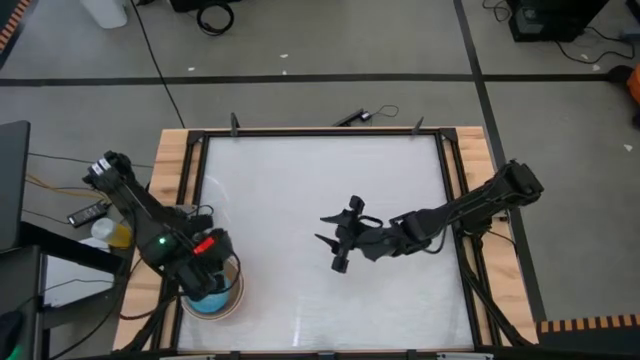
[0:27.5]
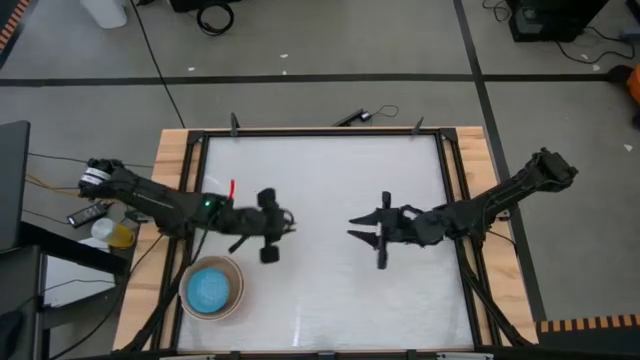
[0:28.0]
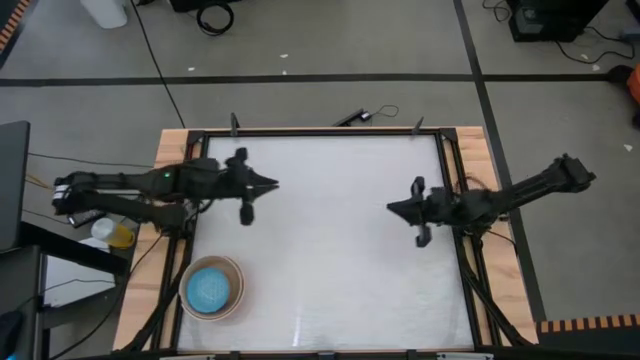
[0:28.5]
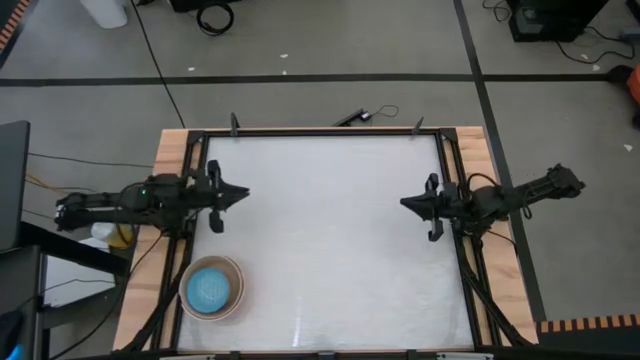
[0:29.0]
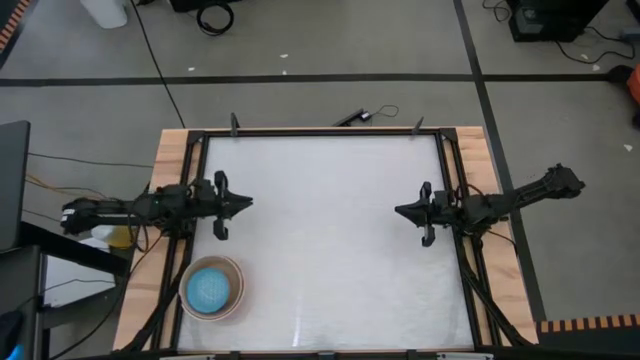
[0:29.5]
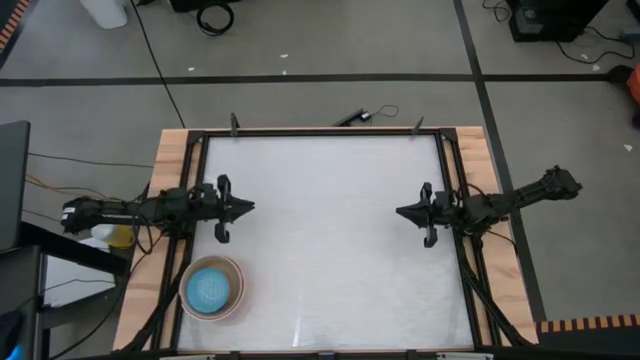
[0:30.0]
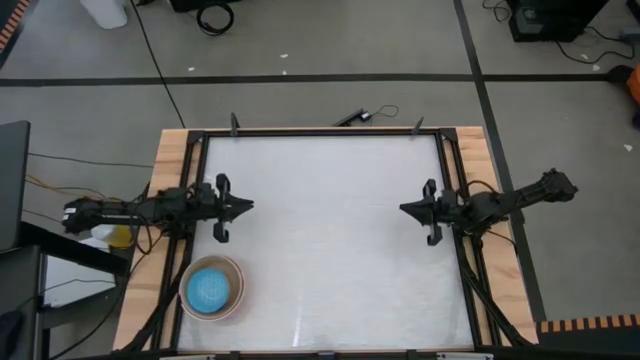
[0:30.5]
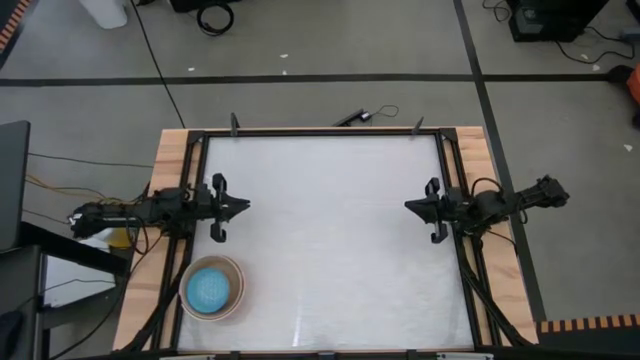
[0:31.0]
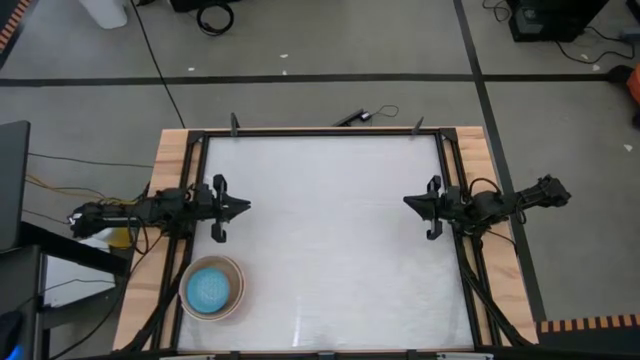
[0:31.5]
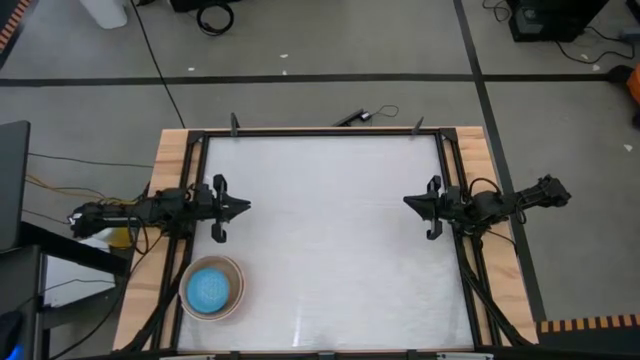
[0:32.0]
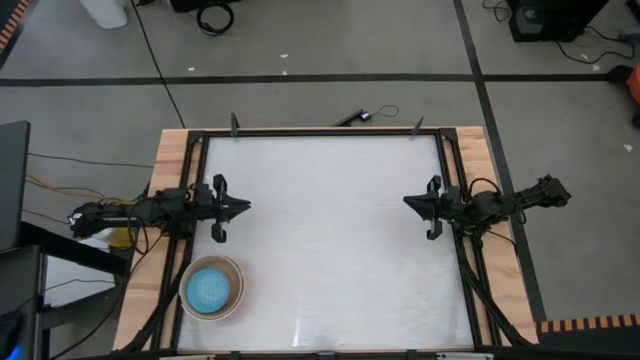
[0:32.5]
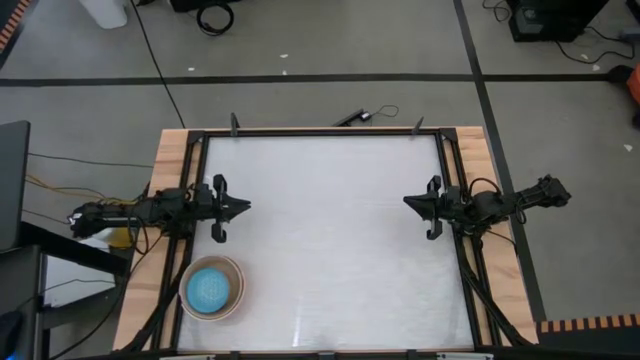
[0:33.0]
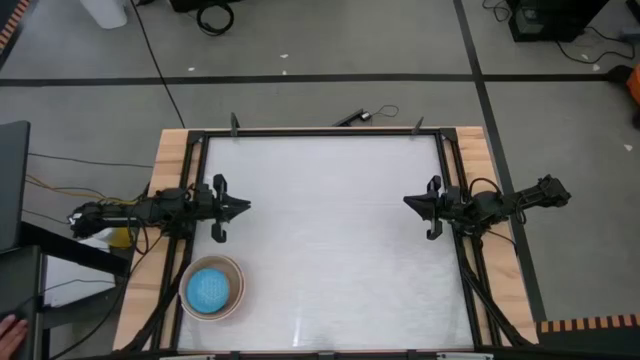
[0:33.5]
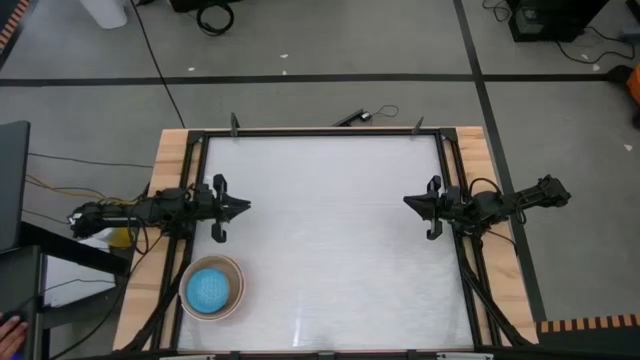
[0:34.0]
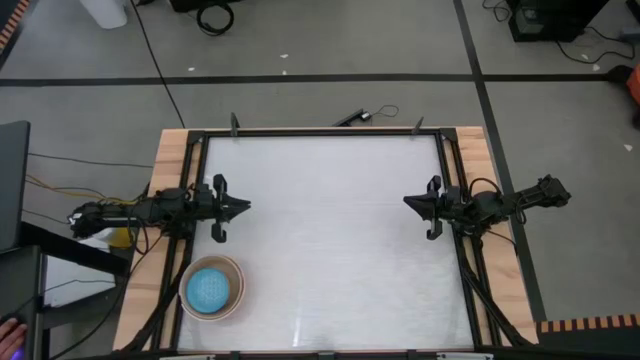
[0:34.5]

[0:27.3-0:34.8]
Return to Home Position

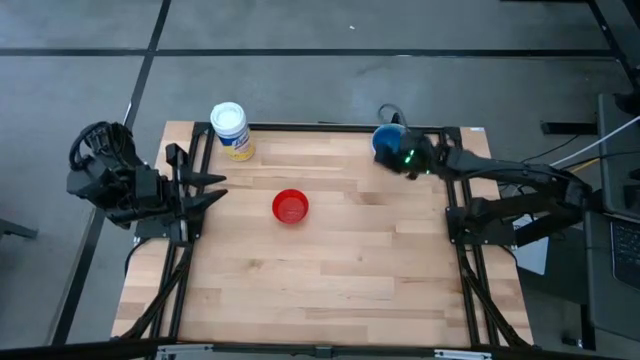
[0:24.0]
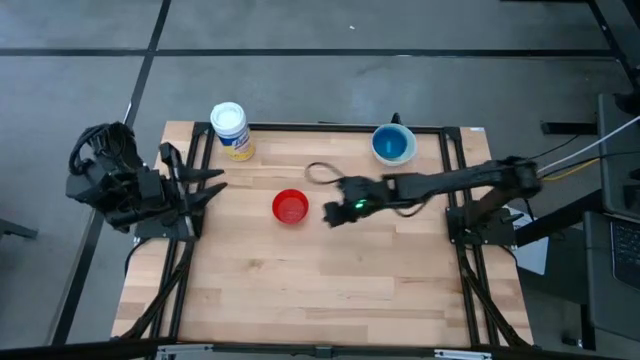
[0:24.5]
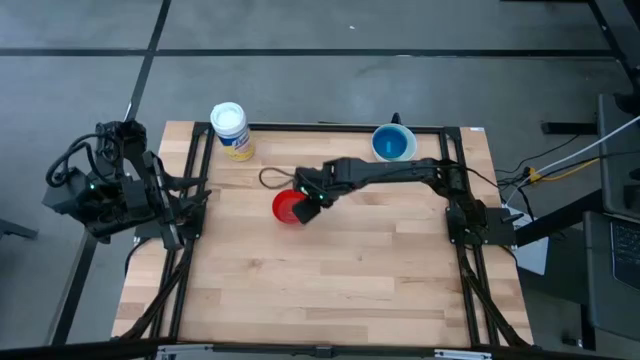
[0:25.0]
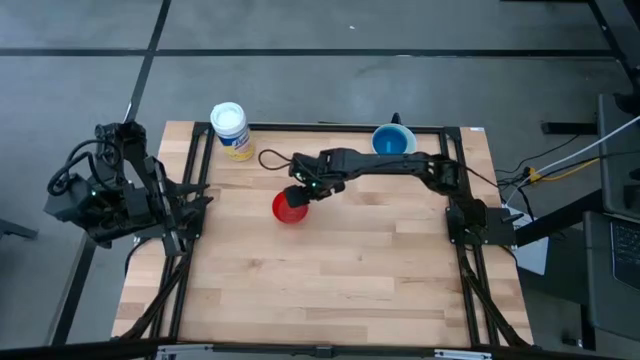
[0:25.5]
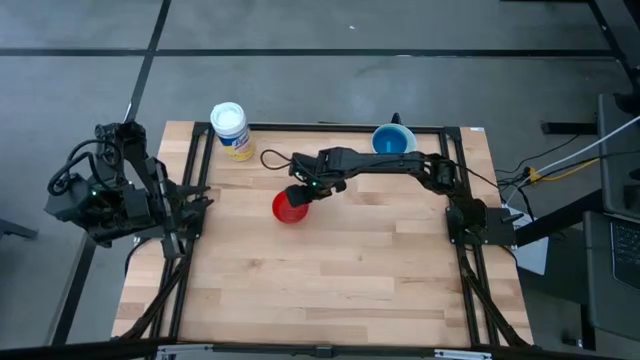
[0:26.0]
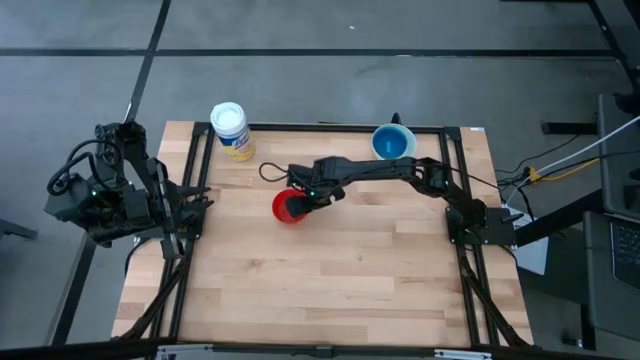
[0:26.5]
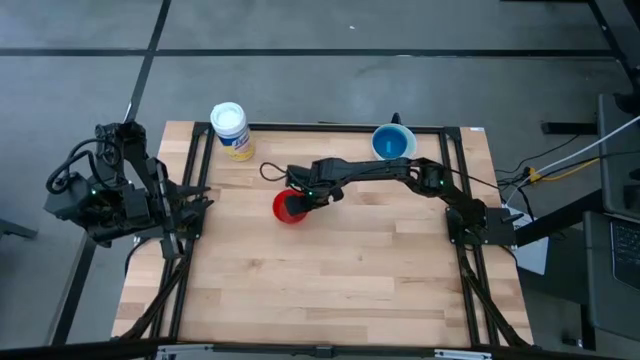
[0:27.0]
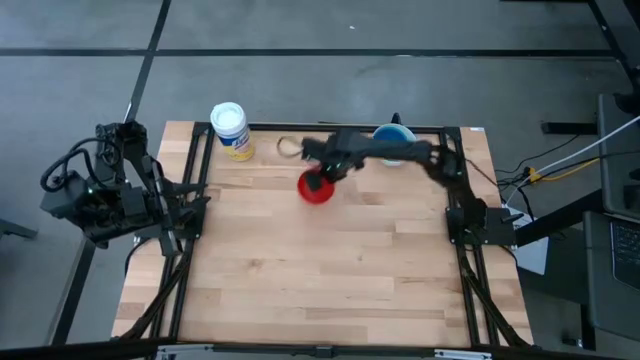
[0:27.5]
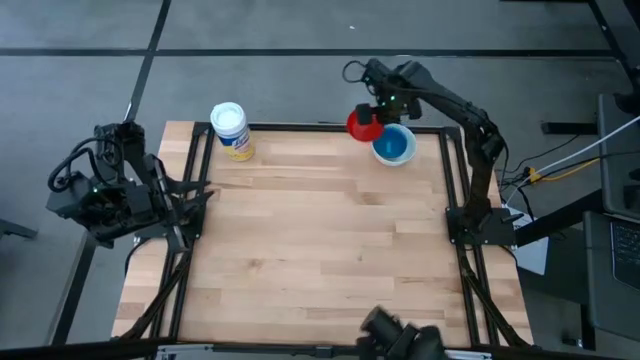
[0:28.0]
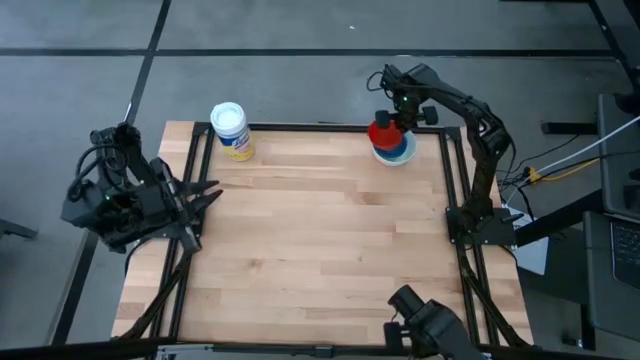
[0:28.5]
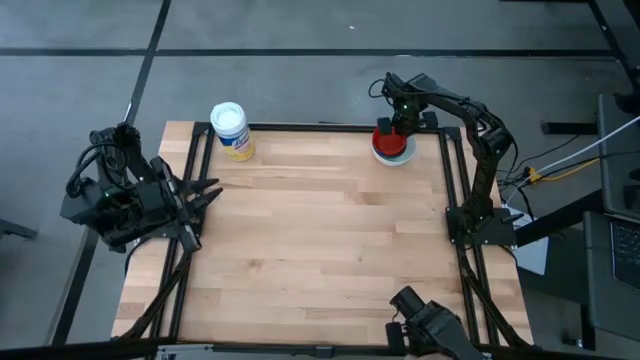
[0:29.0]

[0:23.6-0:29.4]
Stack the red bowl on top of the light blue bowl

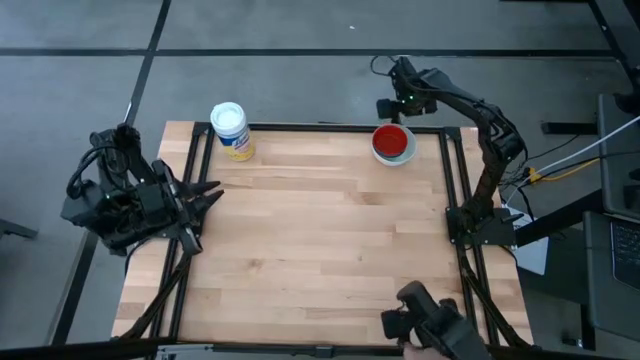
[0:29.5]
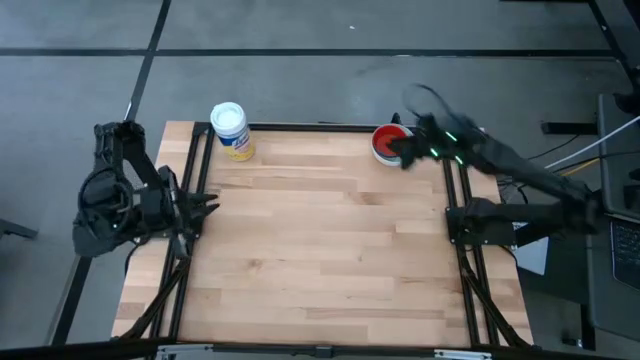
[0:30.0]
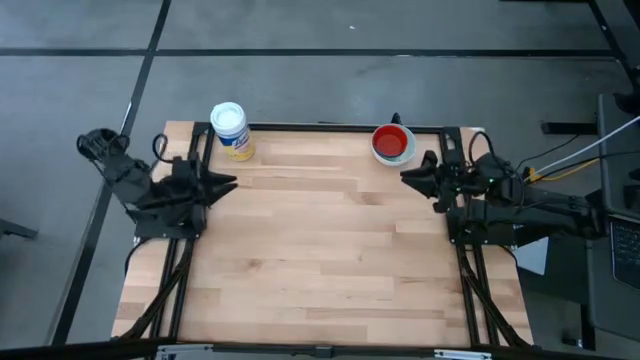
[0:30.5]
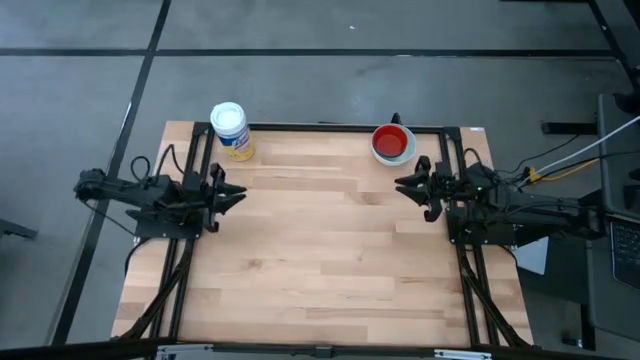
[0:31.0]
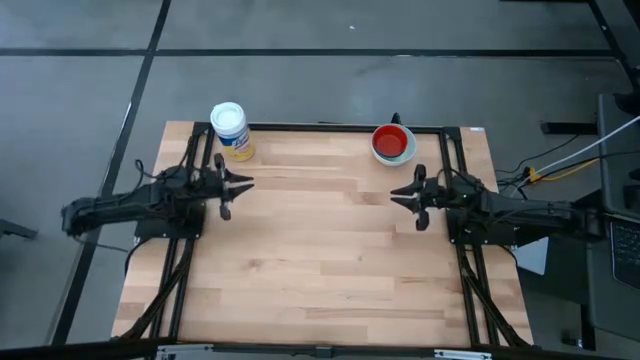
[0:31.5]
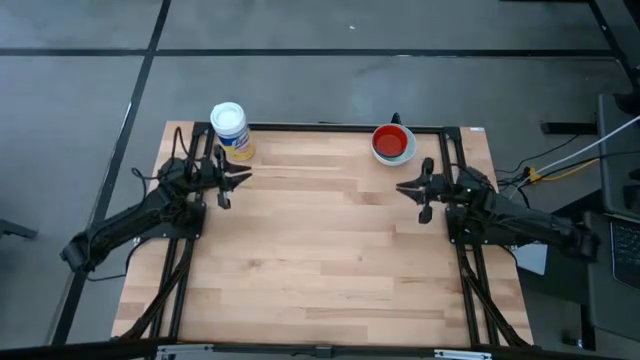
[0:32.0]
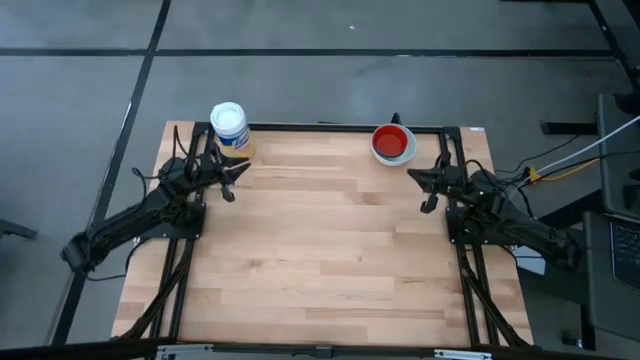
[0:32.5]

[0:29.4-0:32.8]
Return to Home Position
